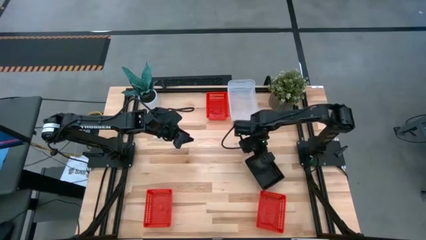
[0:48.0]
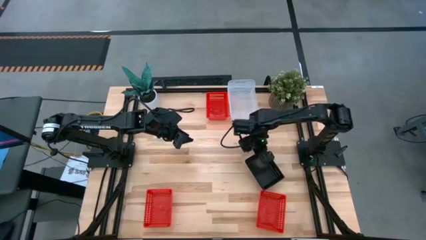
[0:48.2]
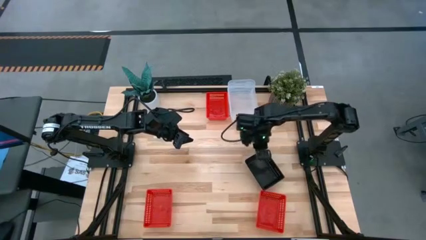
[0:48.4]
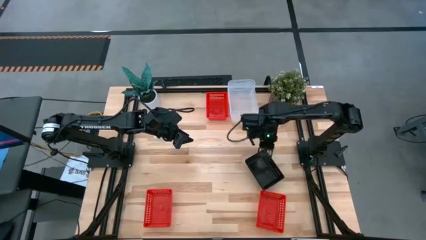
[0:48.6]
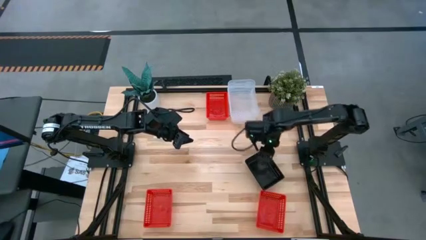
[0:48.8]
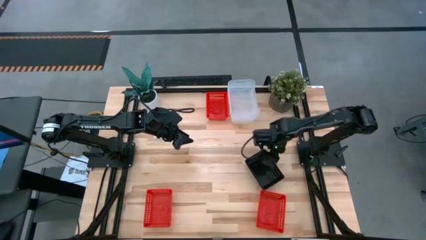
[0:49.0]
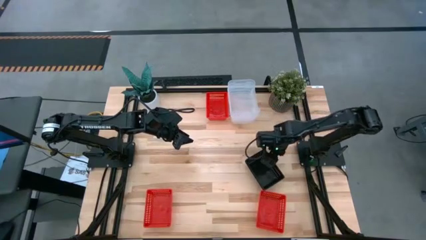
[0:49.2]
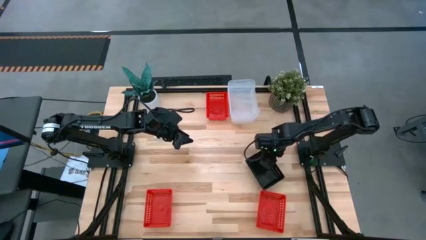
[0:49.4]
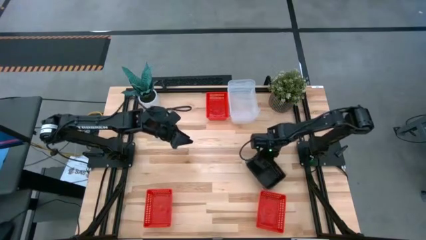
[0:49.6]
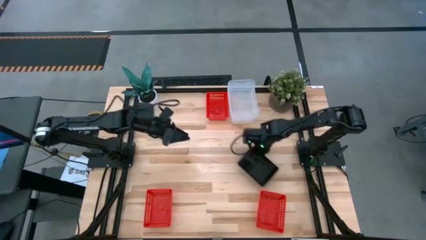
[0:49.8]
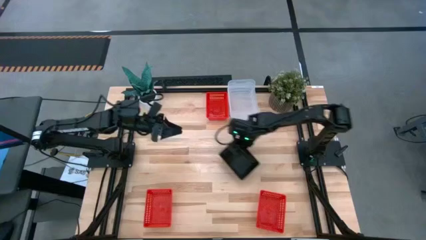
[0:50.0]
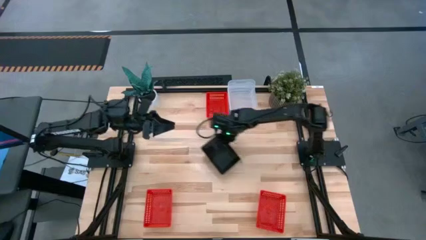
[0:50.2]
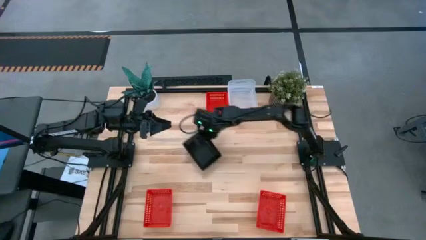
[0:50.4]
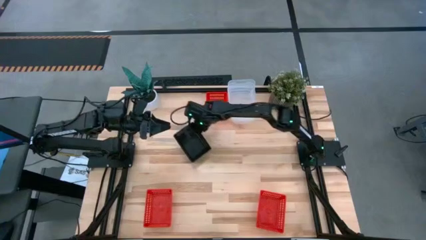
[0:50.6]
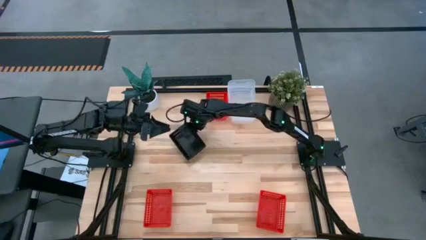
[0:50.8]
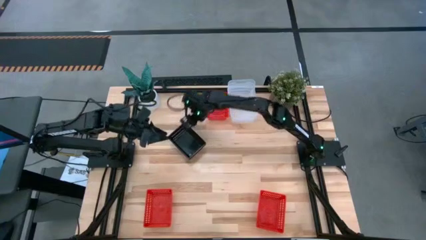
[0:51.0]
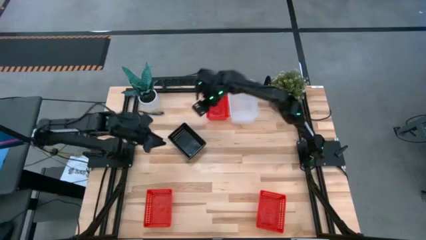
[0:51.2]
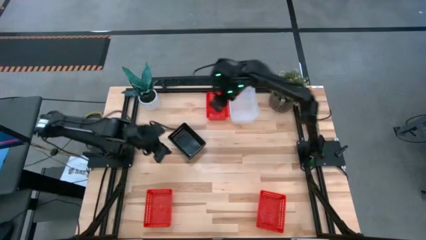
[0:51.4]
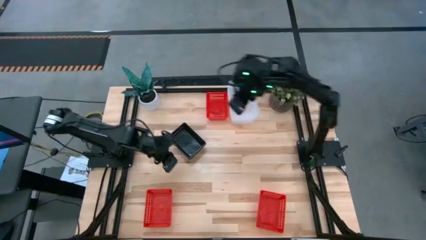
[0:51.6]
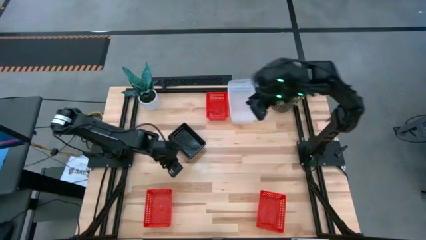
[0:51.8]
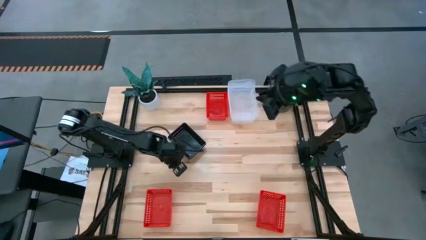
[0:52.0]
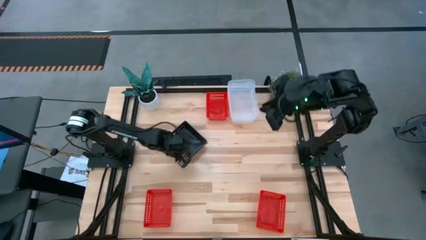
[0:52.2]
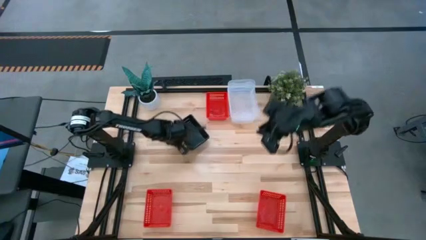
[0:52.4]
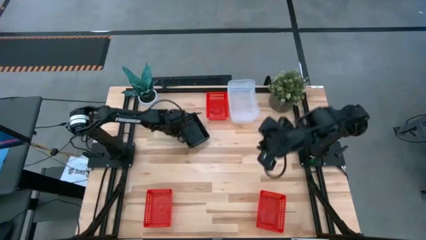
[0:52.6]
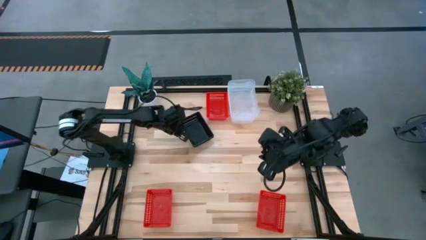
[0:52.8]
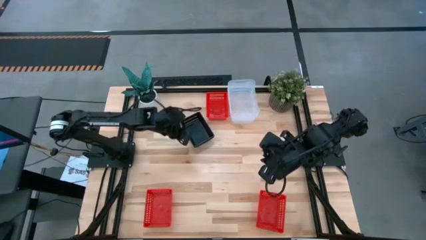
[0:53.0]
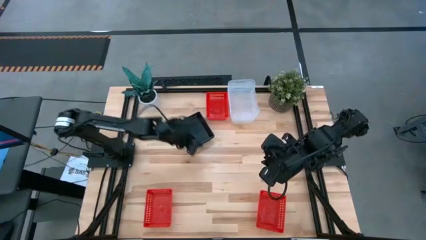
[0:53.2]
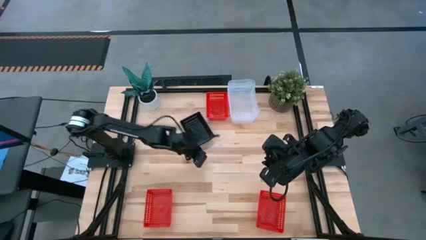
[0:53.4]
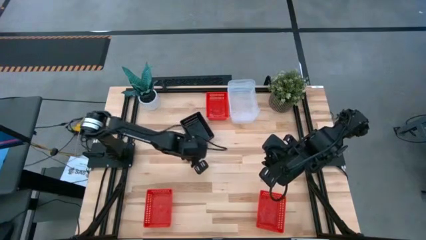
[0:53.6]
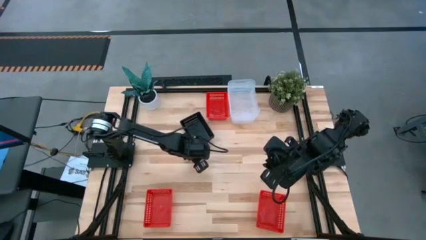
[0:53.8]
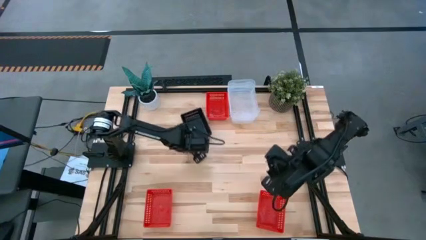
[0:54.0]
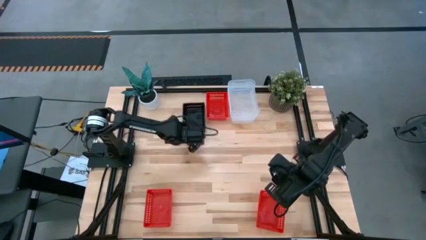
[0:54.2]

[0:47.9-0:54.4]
Move the stacked black bin to the top left of the table

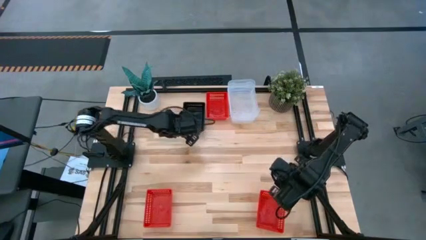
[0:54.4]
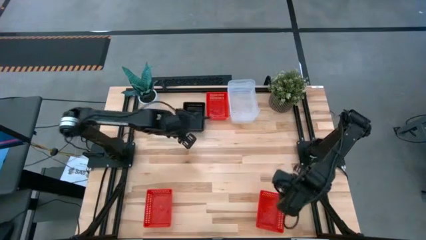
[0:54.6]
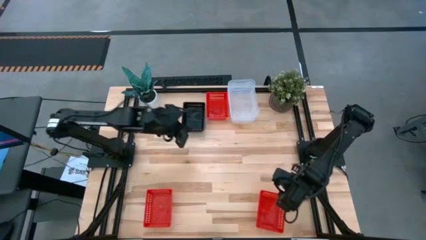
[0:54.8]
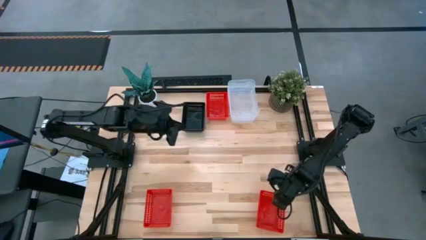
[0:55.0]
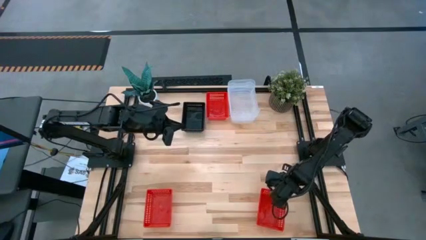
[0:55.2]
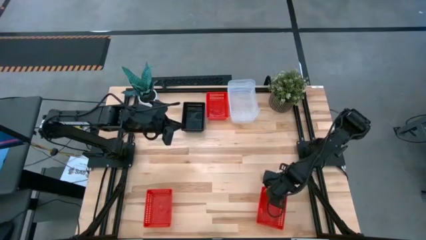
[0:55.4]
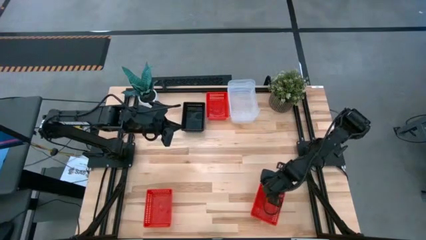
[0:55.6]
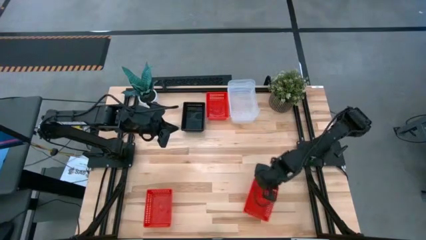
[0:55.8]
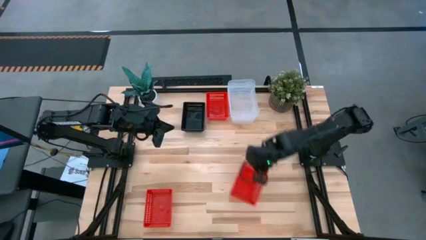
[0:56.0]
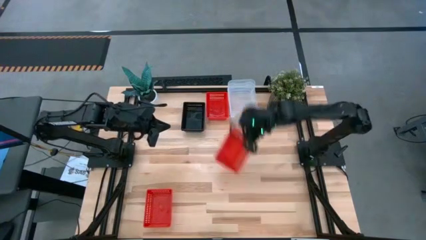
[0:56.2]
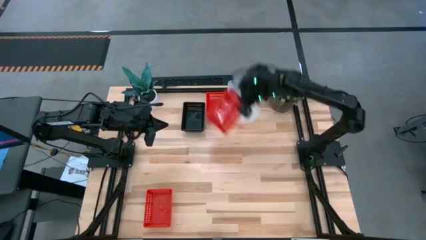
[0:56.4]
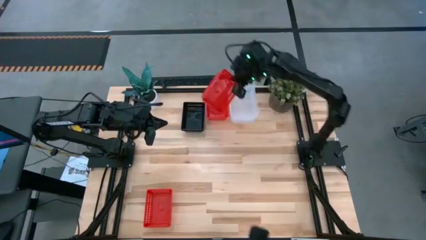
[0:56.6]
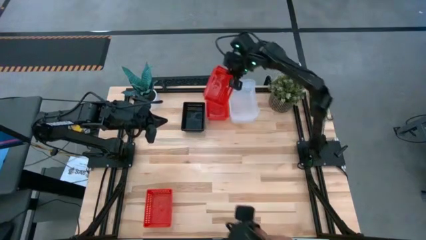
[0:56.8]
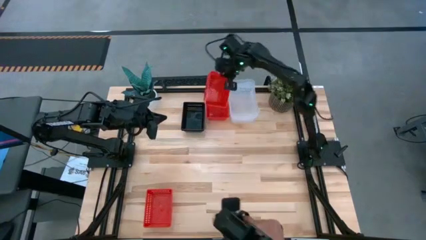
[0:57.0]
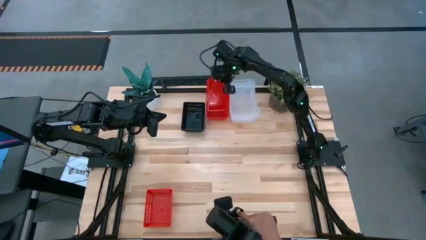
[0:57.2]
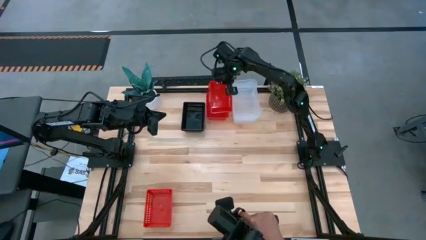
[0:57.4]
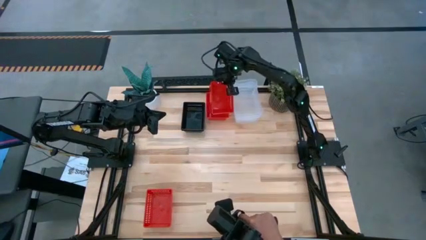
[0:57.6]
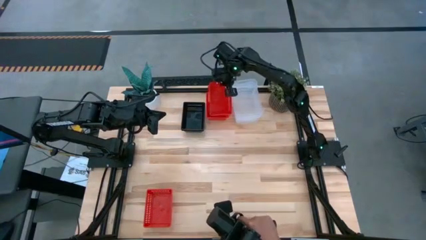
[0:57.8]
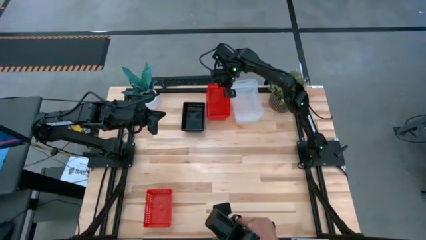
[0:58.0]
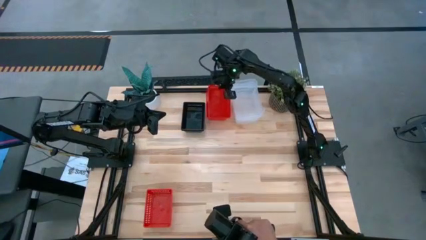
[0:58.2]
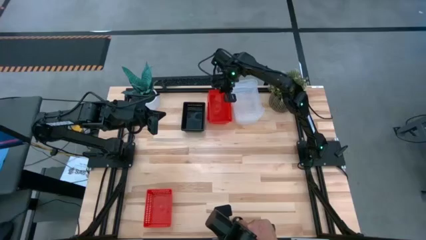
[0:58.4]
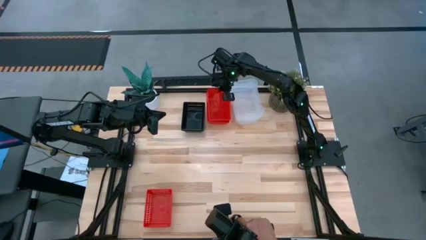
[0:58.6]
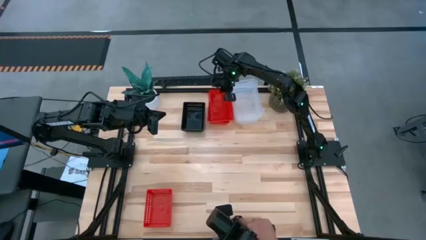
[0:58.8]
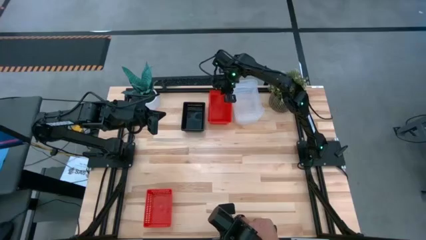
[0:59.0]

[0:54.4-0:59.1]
Stack the right orange bin on the top orange bin
